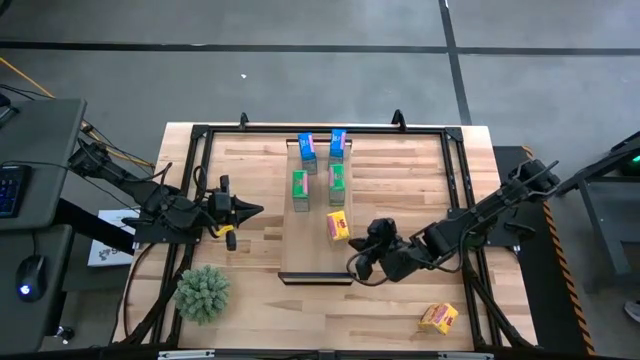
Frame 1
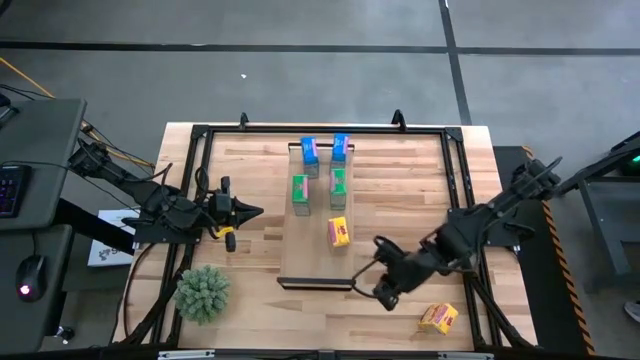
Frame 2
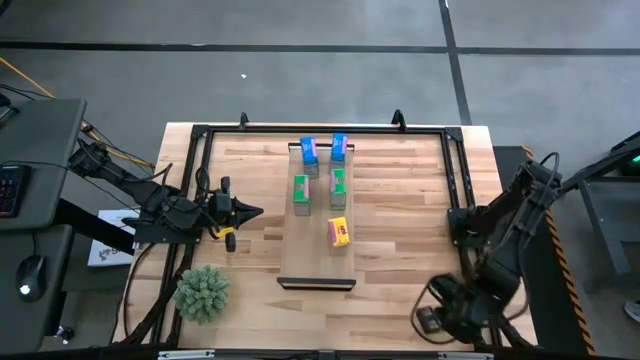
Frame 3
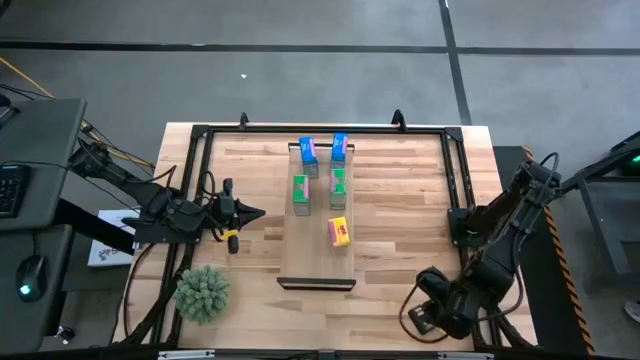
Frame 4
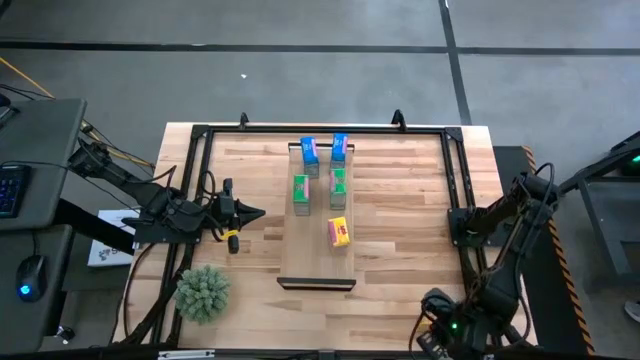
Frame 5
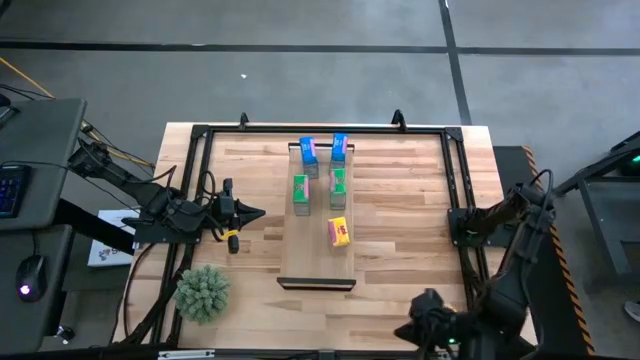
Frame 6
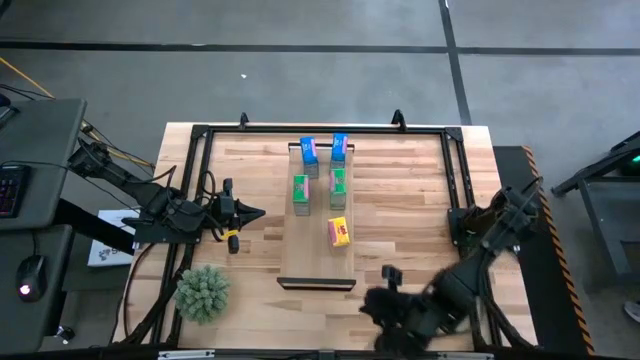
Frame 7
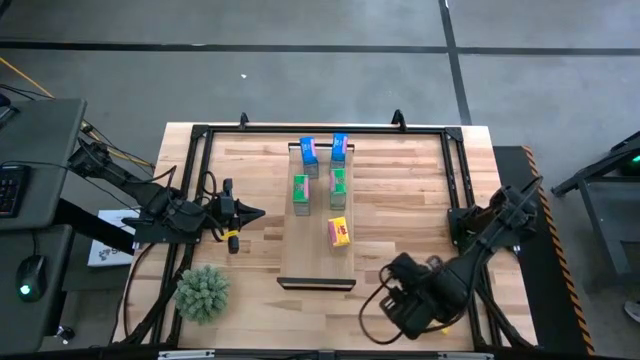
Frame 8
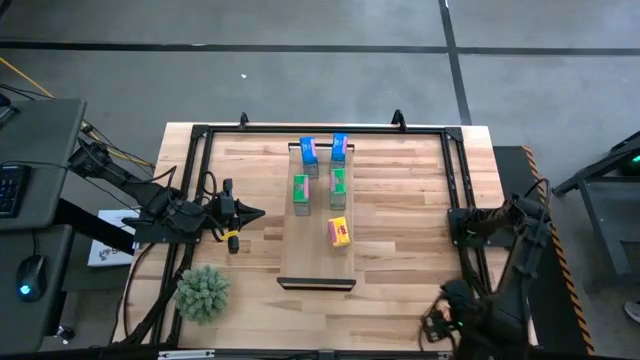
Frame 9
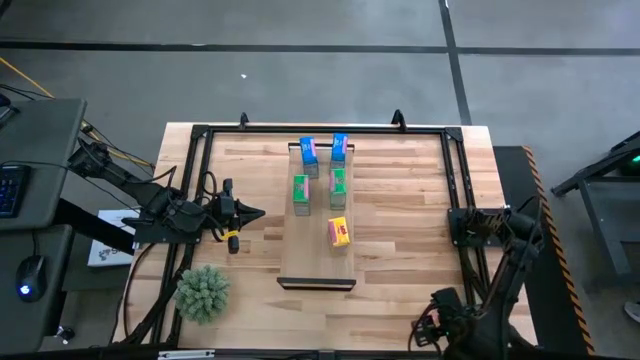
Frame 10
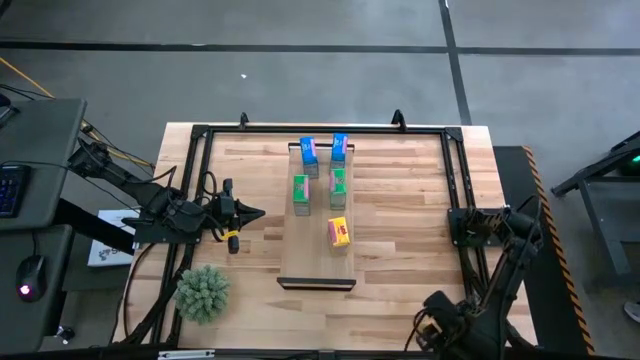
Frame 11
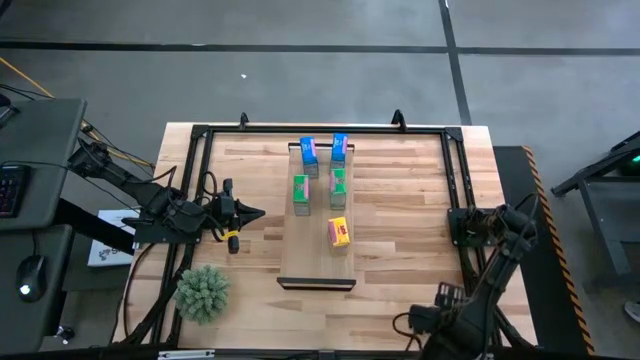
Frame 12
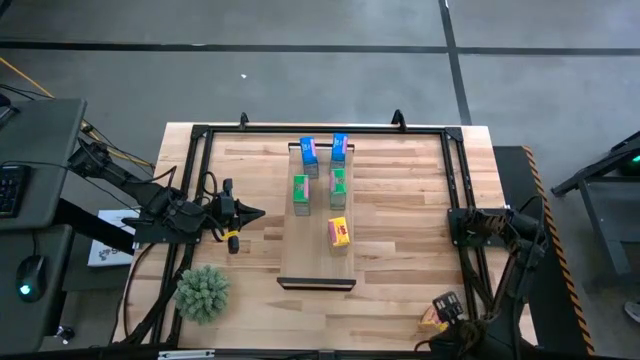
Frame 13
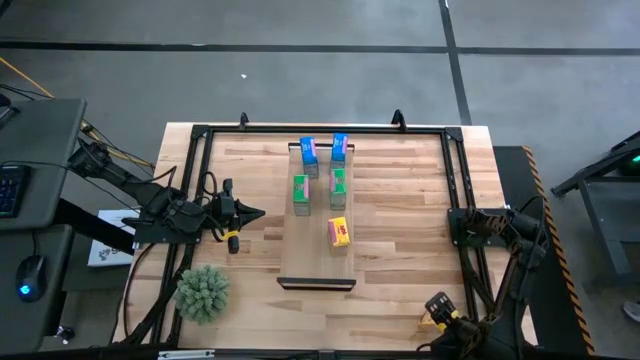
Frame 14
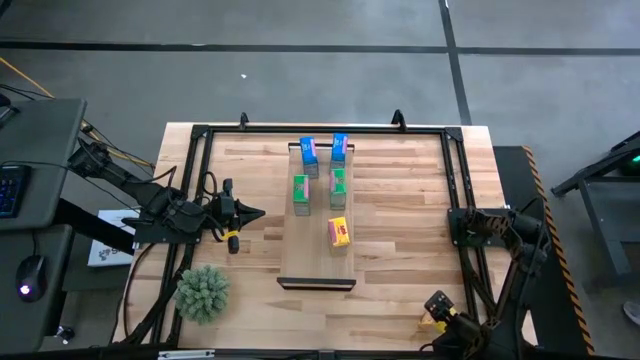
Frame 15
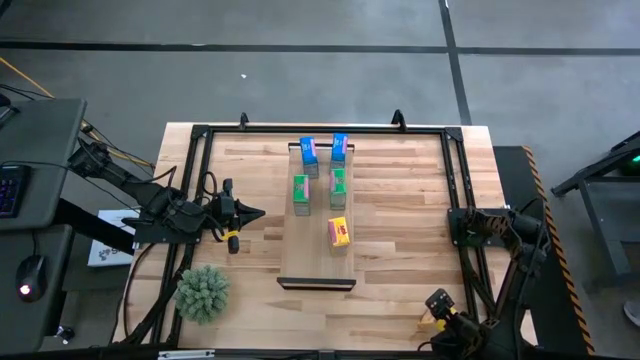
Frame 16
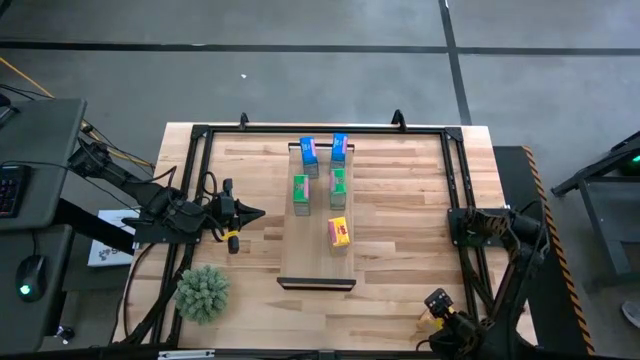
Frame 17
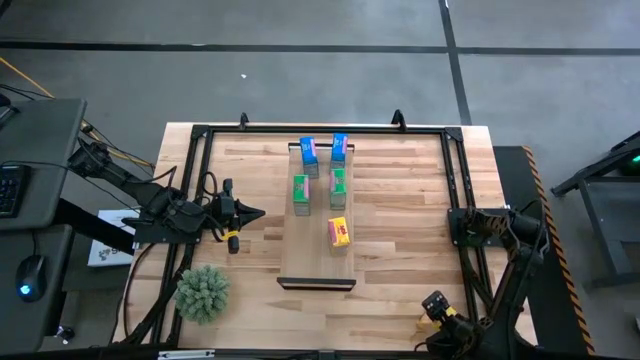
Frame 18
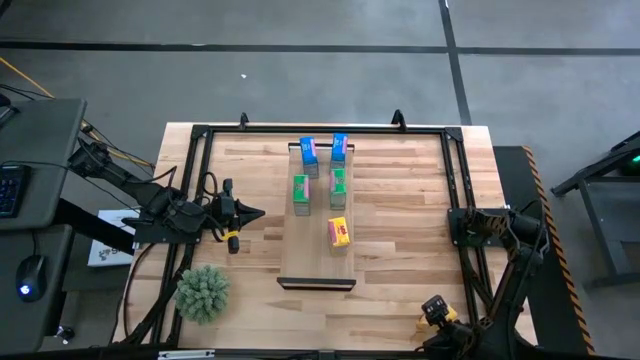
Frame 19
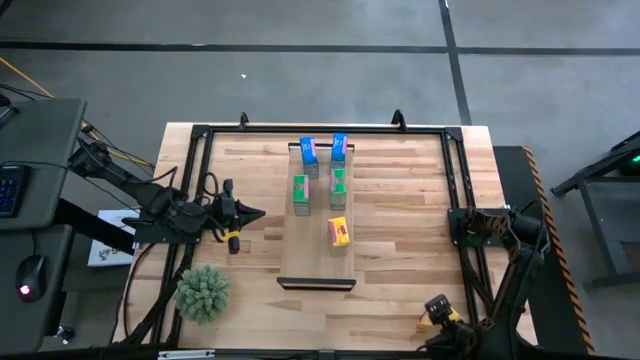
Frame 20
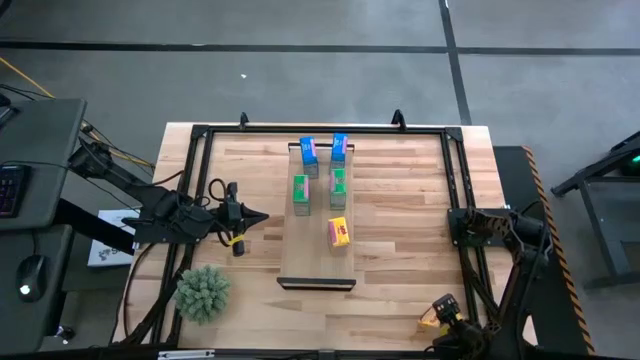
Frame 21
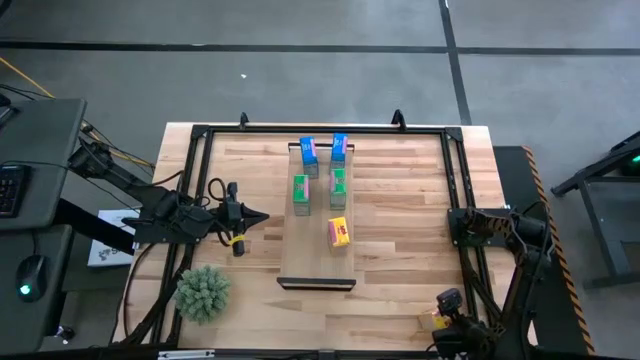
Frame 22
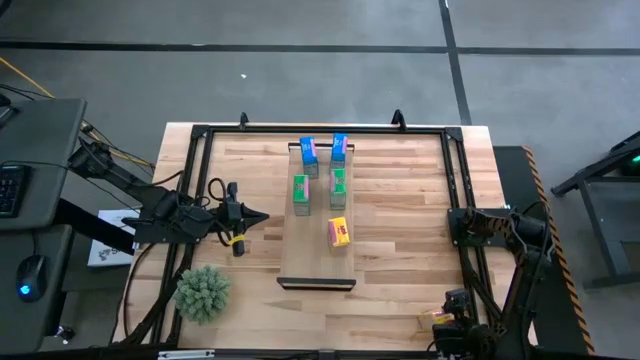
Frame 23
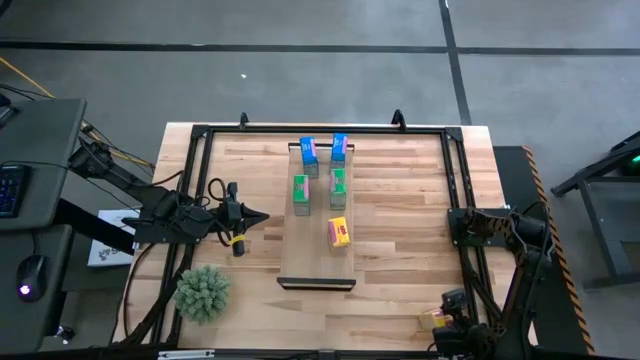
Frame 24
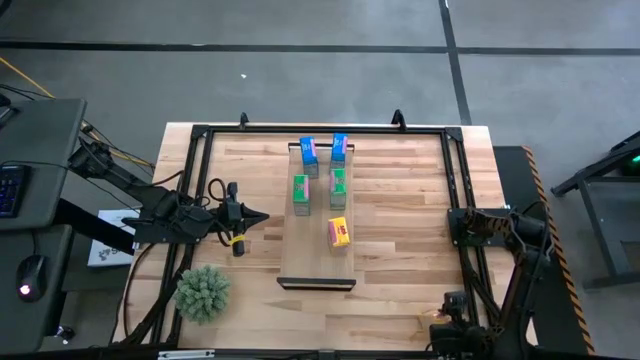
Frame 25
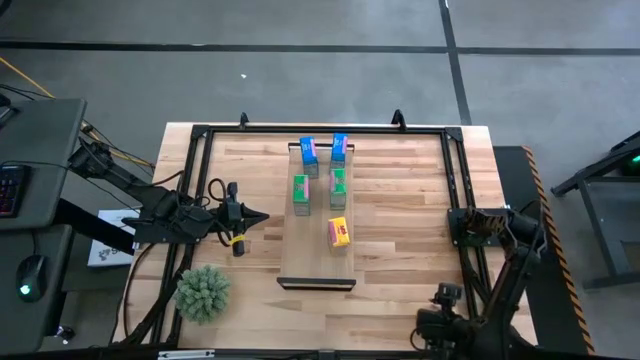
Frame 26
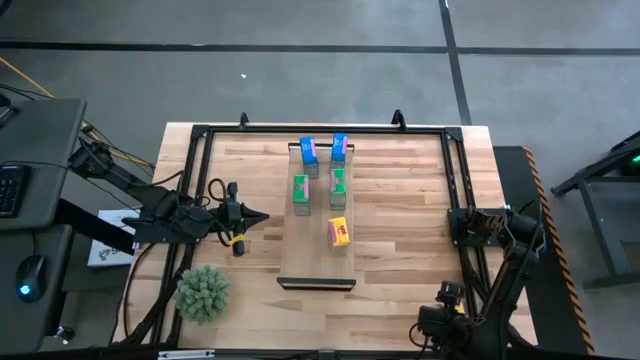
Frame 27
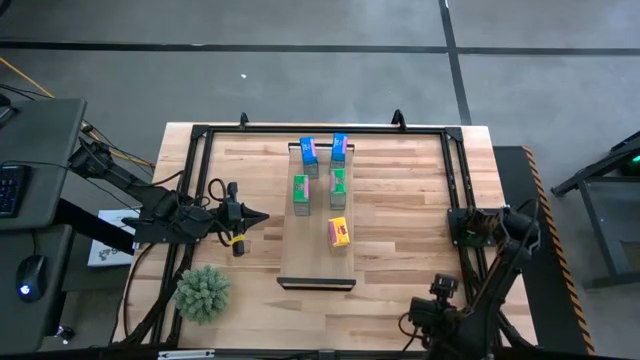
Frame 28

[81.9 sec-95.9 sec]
Task: Stack cereal on shelf
Put the yellow cereal box on the shelf aligned with the other yellow cereal box

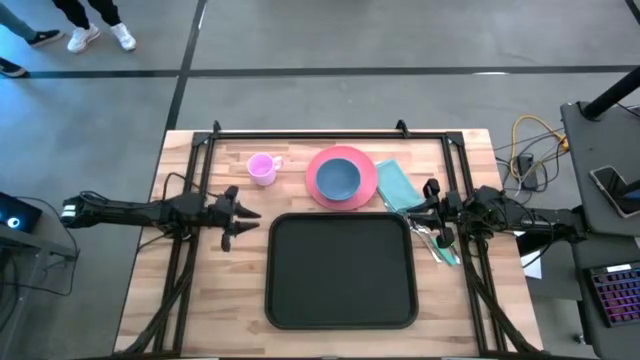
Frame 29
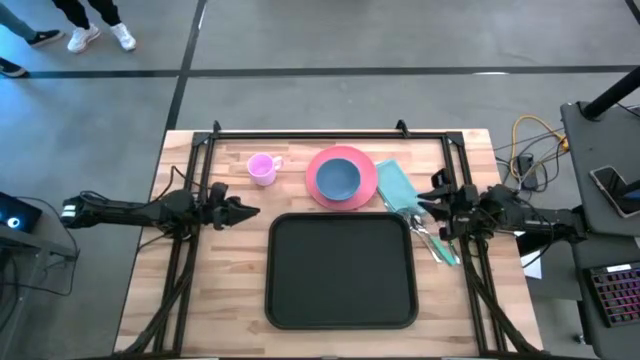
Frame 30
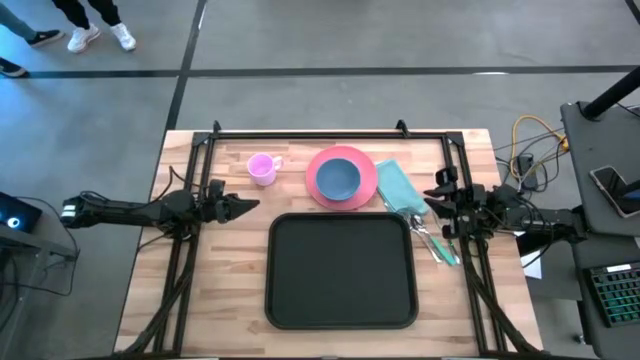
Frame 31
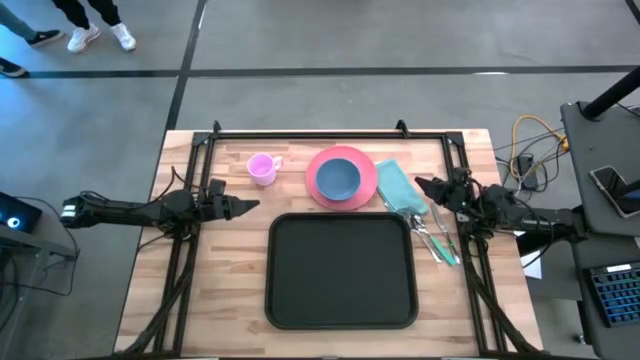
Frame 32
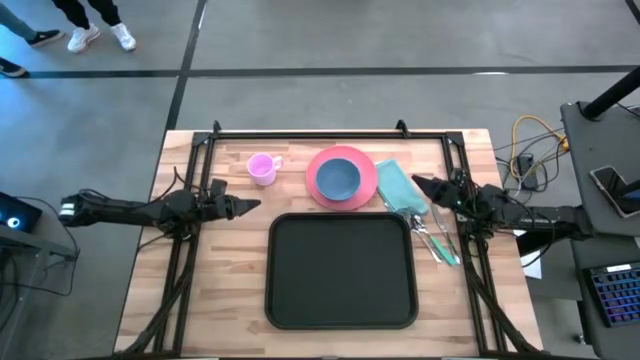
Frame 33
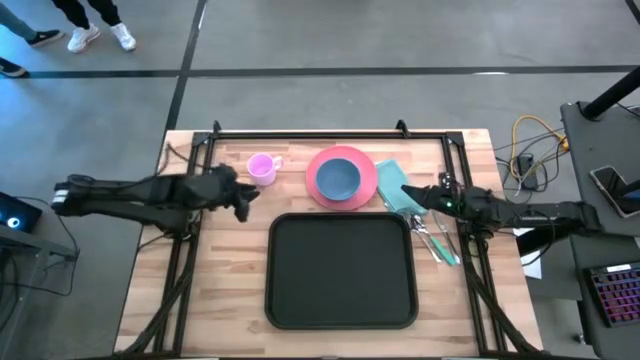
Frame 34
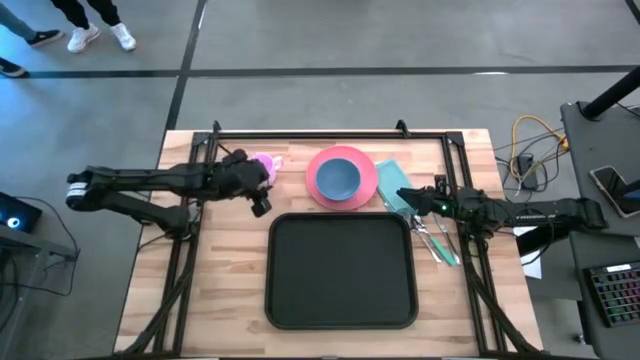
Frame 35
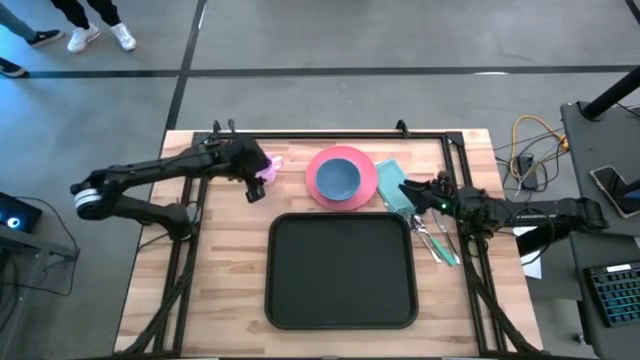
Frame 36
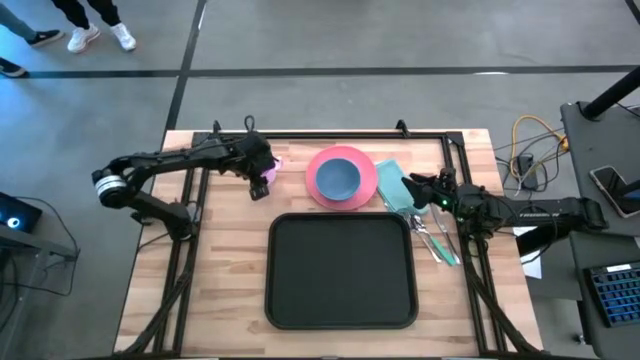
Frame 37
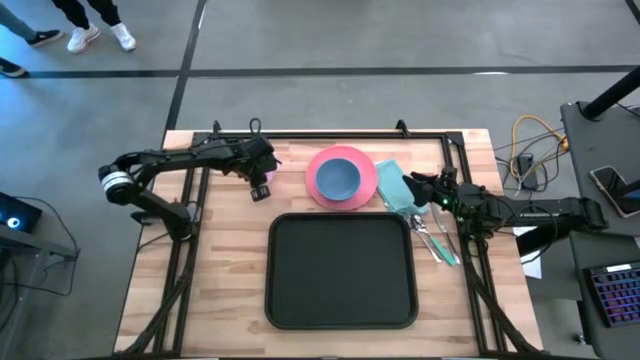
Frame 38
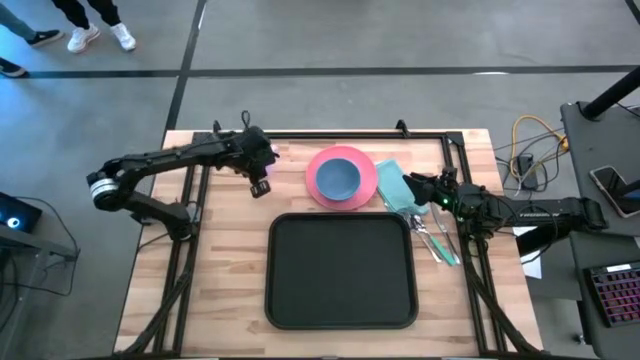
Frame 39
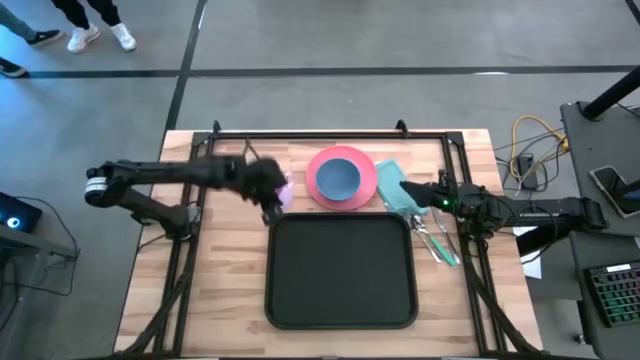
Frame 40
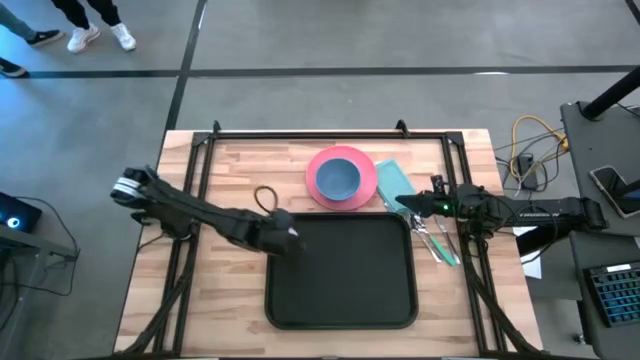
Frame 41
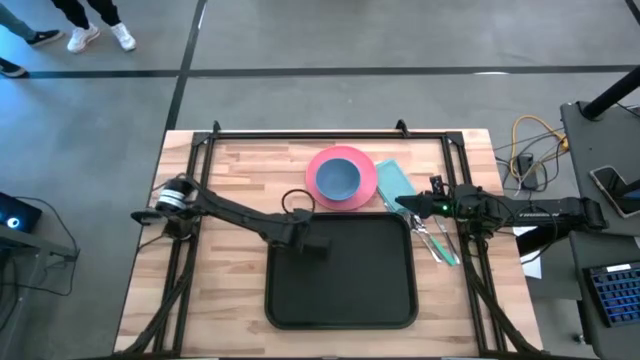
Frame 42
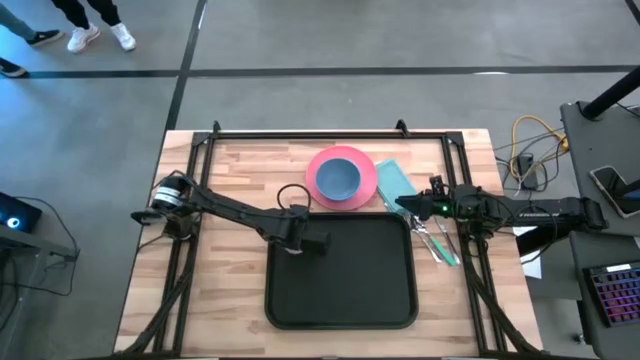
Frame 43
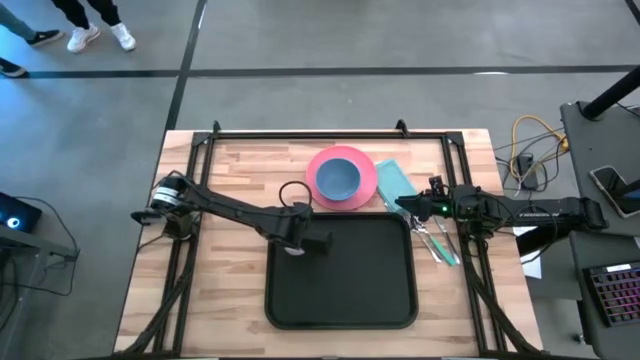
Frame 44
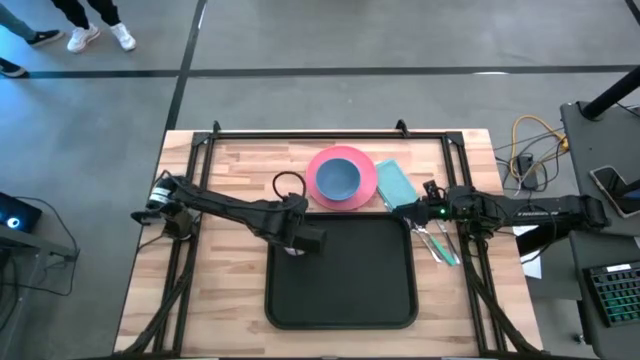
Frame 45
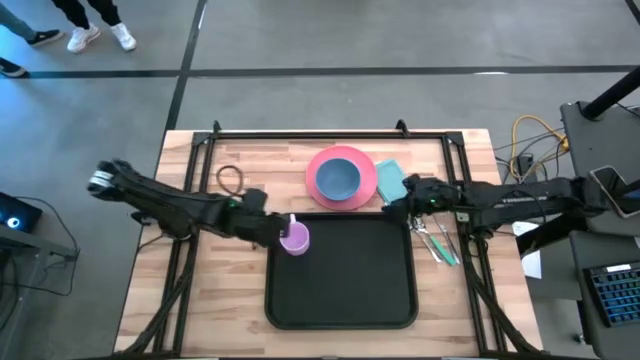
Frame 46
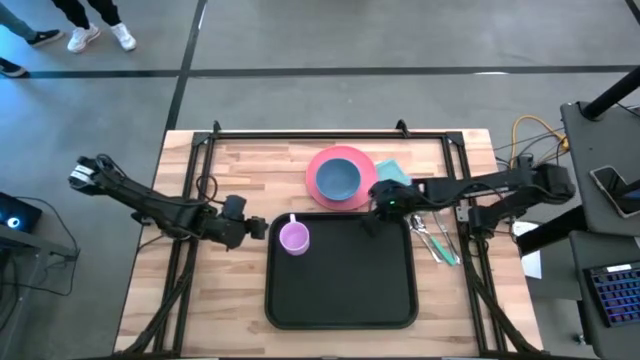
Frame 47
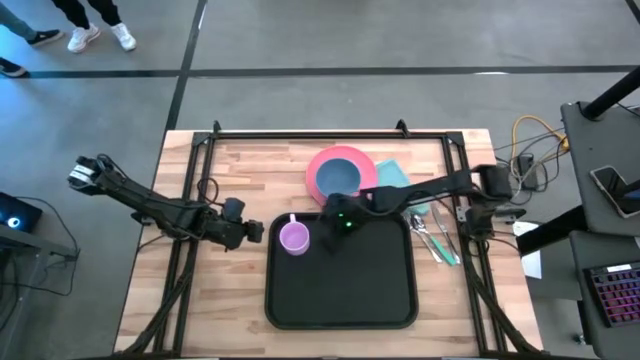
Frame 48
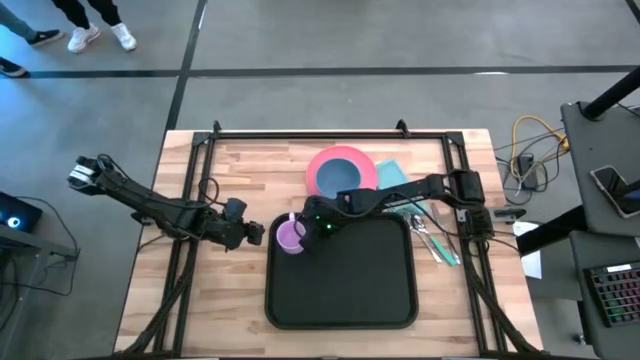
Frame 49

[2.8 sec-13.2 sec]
Task: Set up tray
Put the pink mug on the black serving tray
